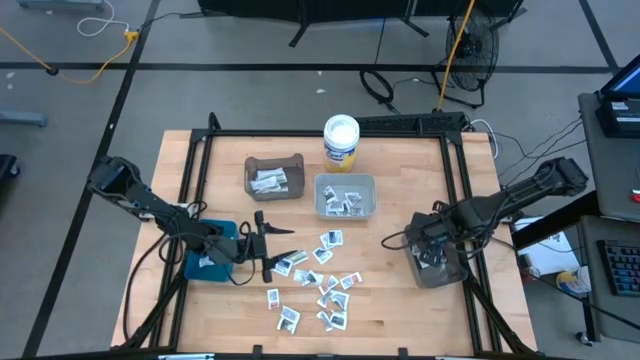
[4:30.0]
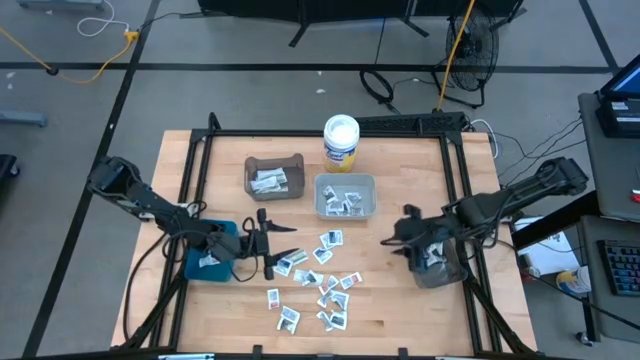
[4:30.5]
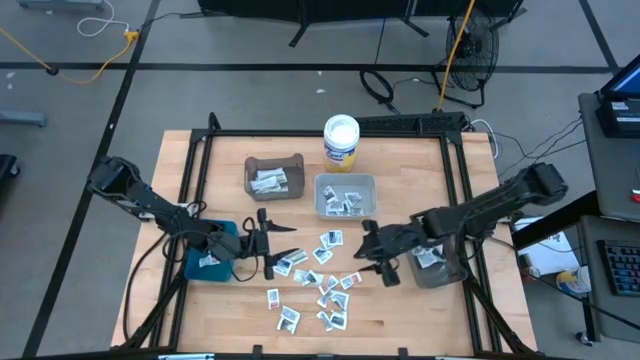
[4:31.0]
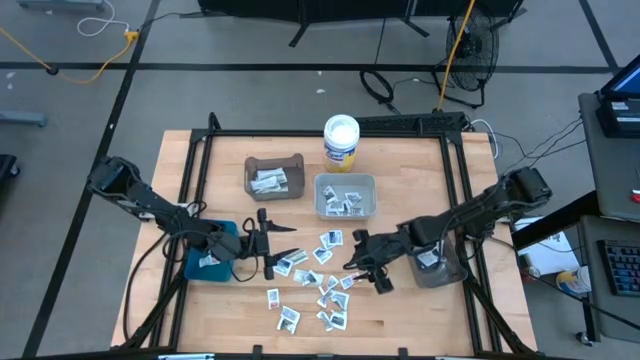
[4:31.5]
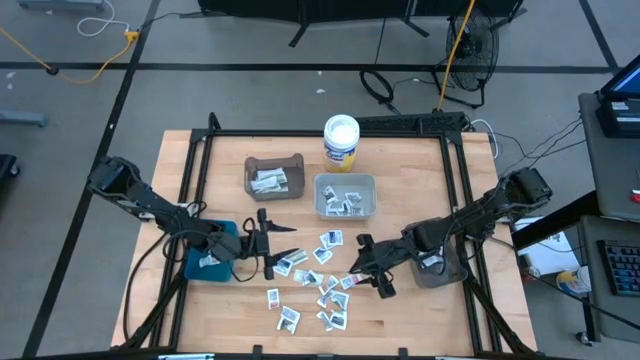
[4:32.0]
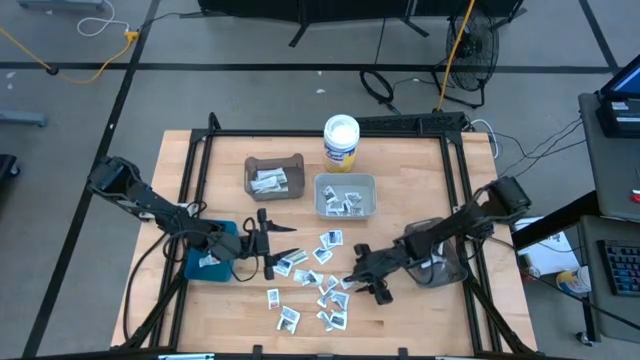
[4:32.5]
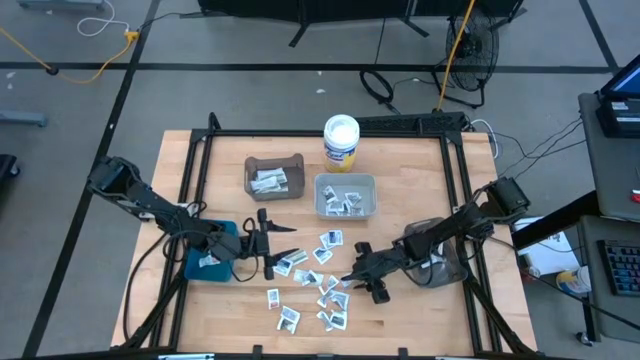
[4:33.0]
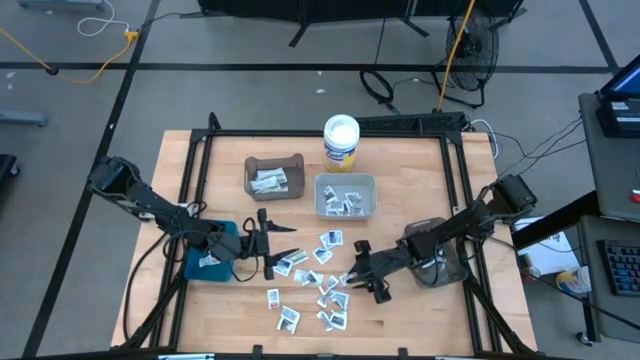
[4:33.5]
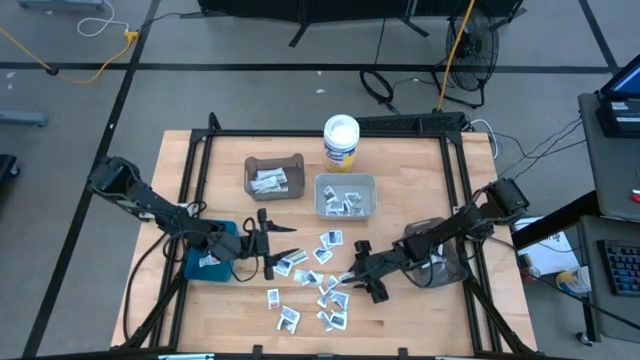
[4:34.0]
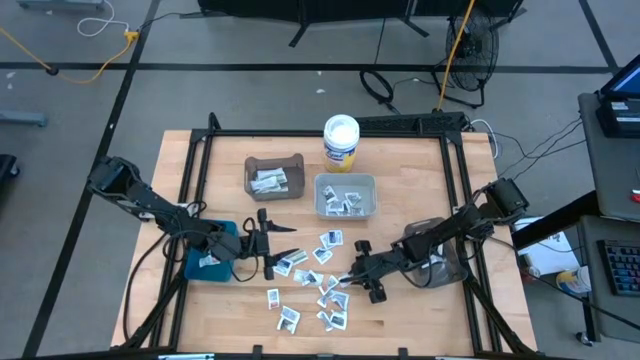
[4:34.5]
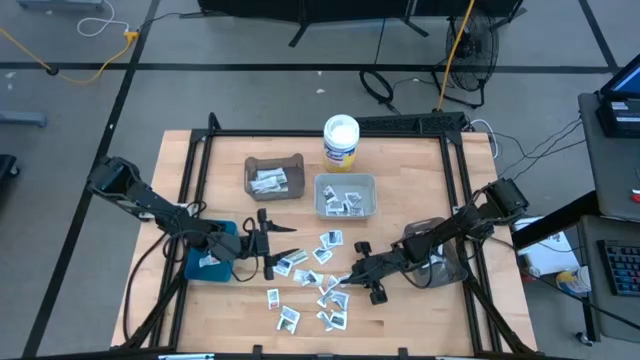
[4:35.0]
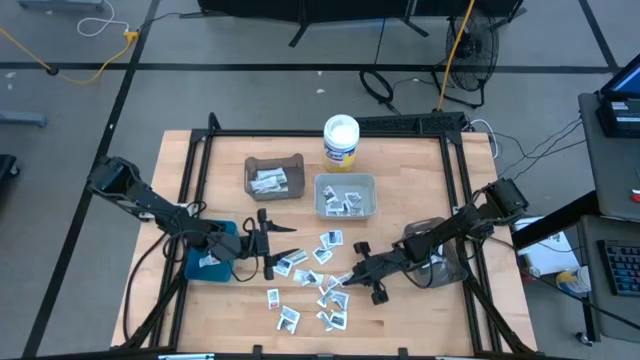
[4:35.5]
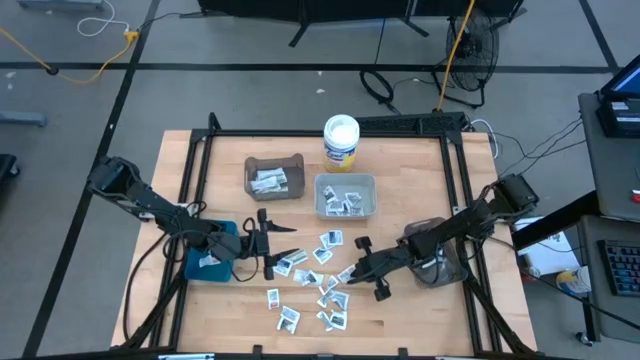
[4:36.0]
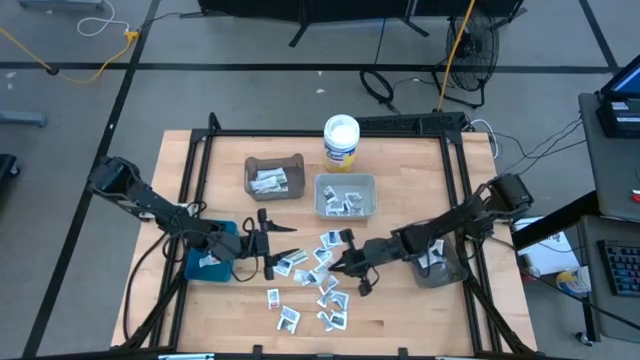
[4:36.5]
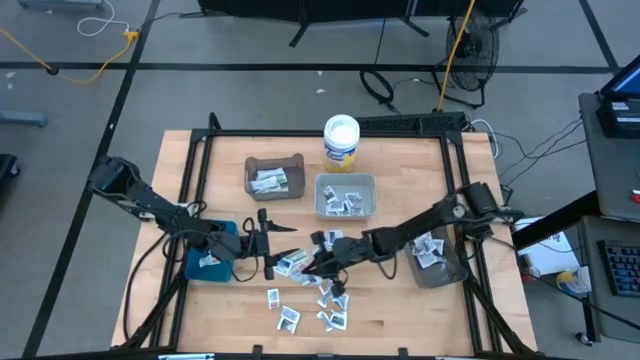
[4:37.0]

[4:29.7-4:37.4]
Task: Pick & Place First Aid Supplies
Move the orange ointment pack to the center of the table

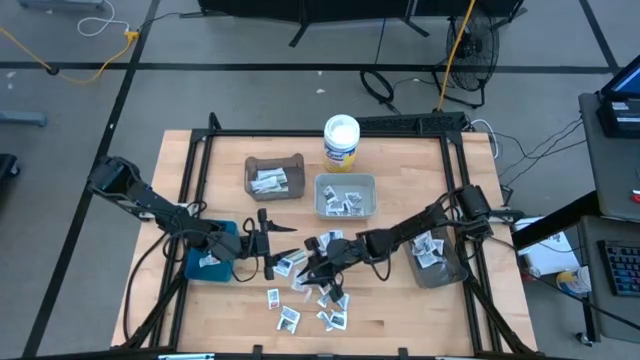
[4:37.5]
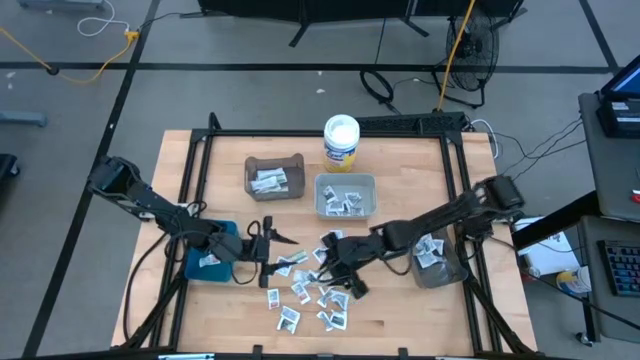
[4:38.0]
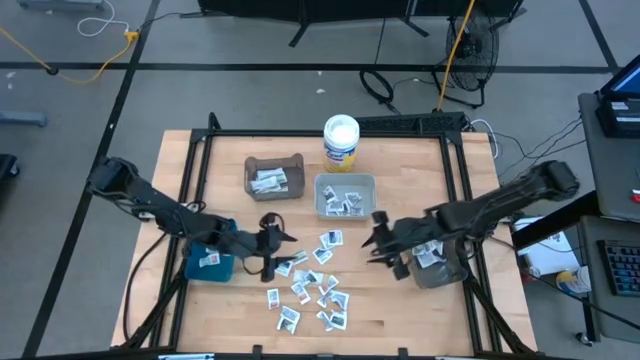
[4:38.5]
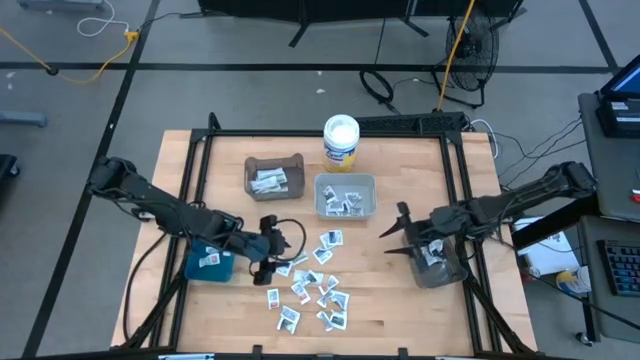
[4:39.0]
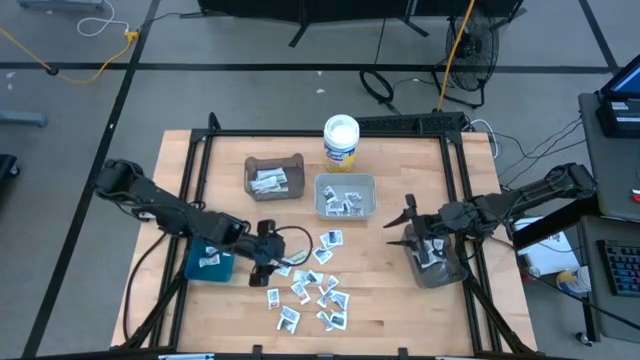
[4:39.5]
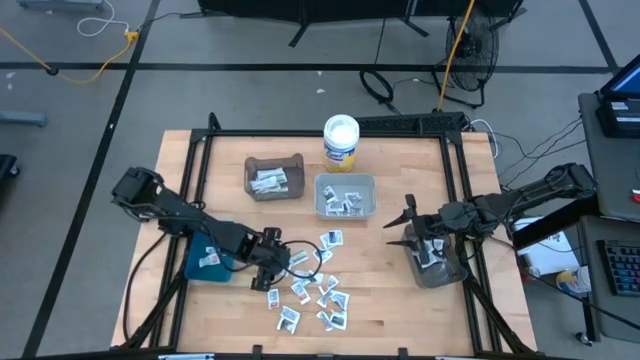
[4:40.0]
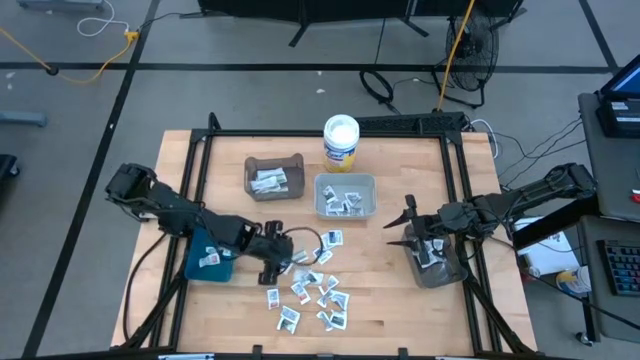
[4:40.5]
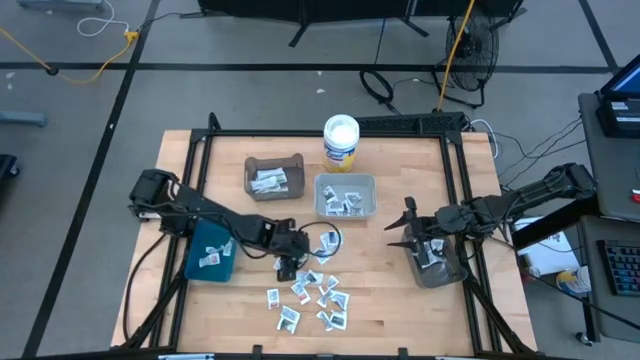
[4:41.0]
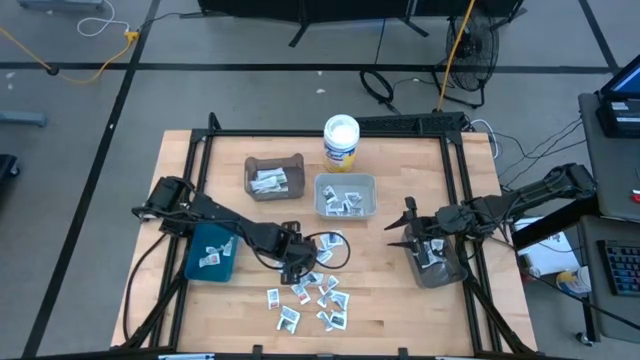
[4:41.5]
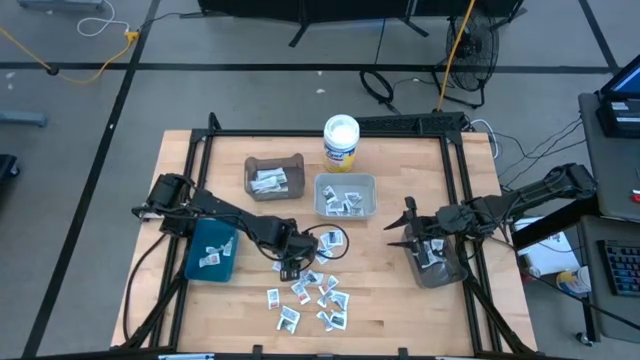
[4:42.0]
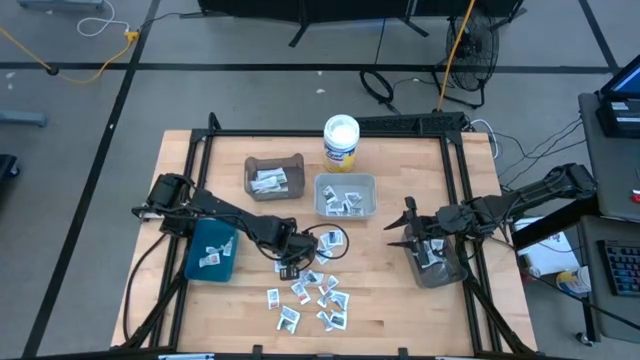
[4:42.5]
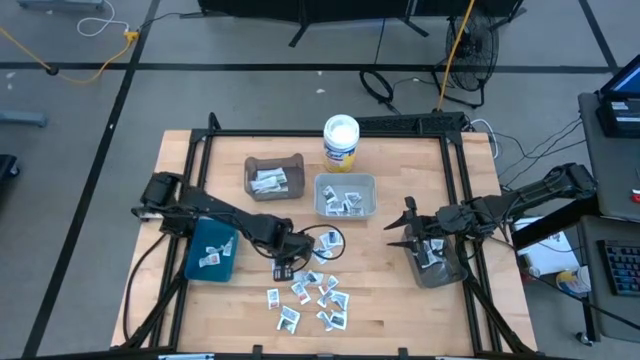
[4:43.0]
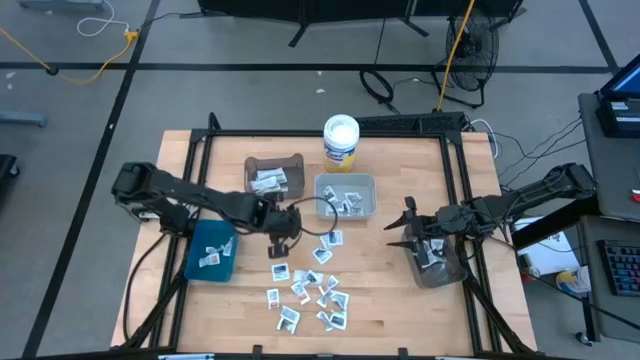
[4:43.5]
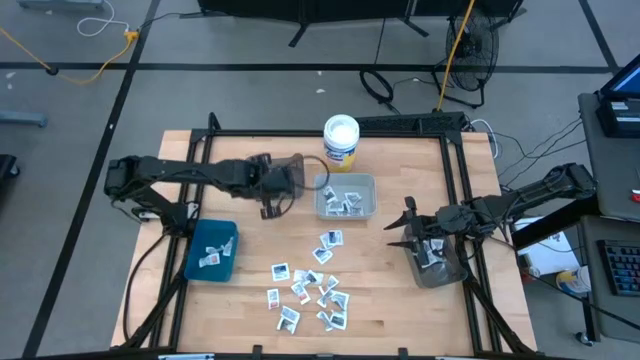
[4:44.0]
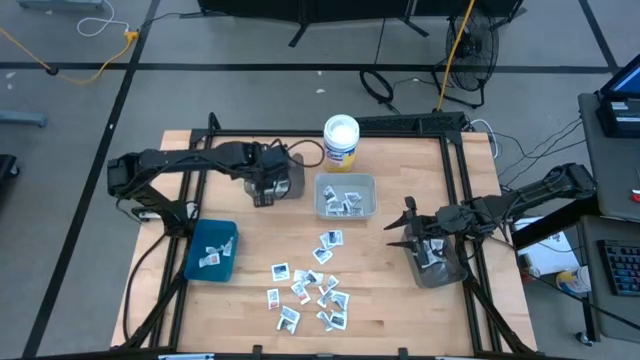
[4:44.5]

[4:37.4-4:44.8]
Put the green bandage pack into the top black bin

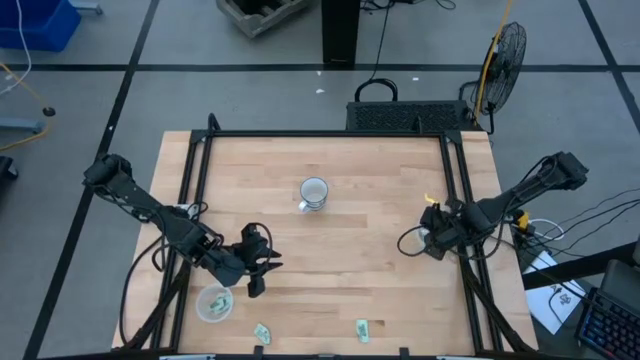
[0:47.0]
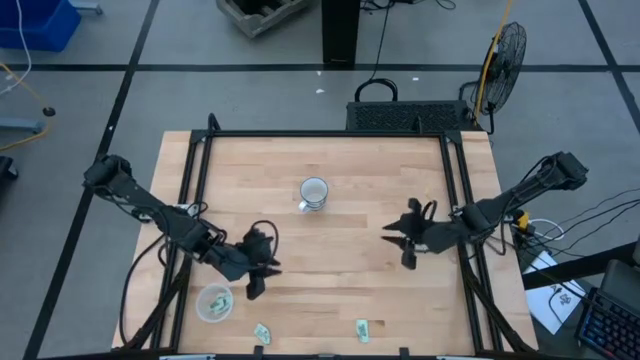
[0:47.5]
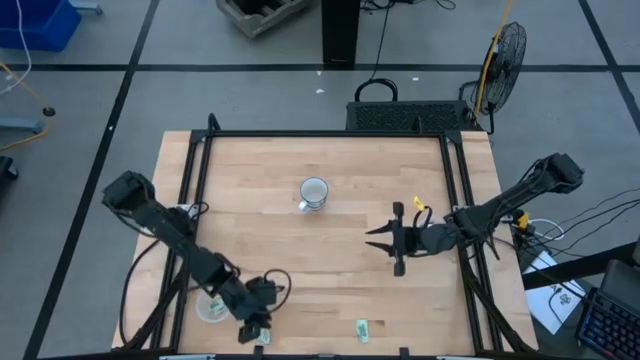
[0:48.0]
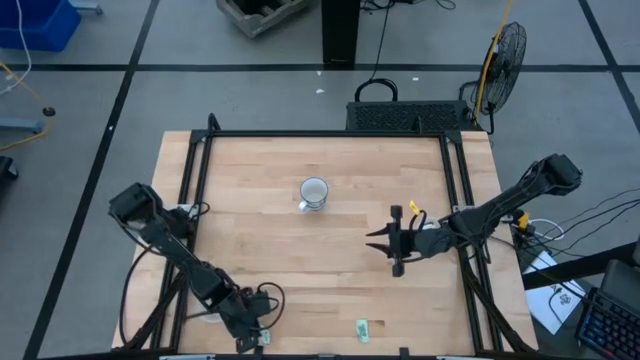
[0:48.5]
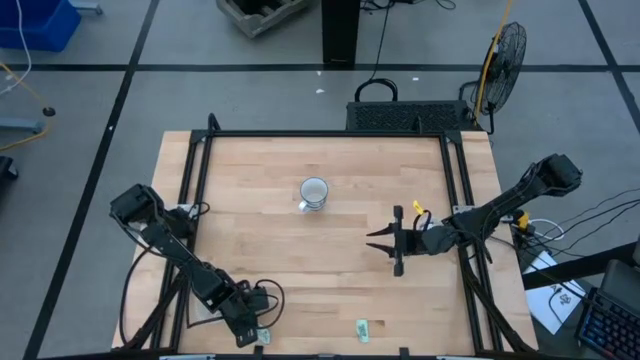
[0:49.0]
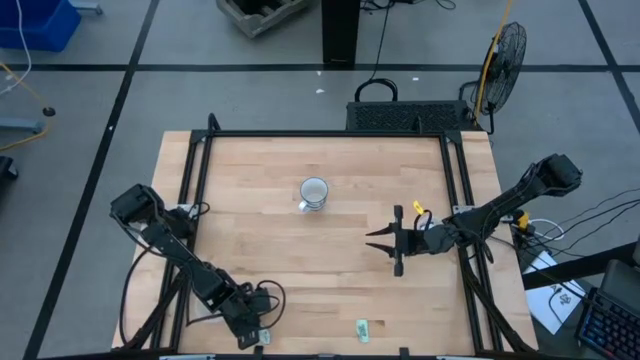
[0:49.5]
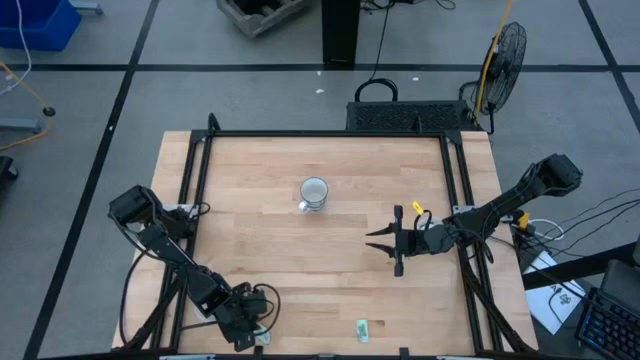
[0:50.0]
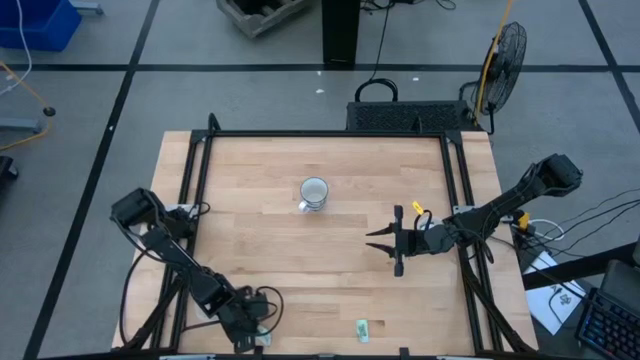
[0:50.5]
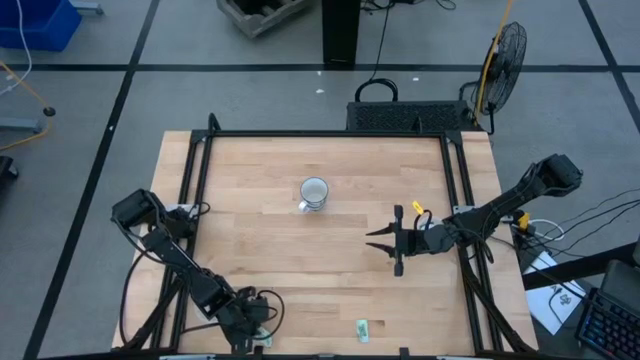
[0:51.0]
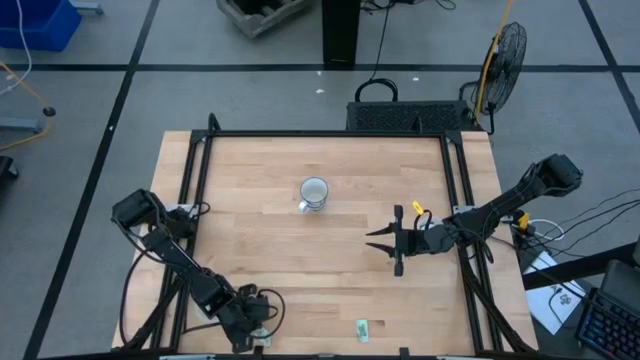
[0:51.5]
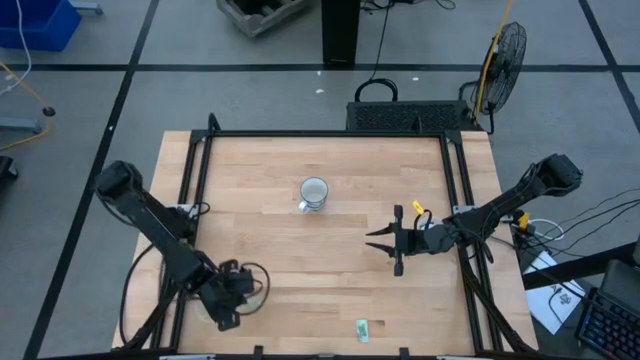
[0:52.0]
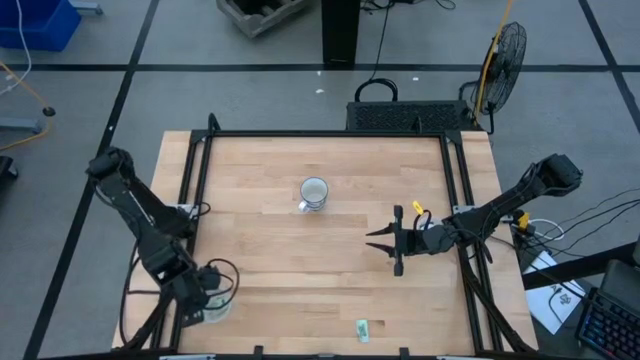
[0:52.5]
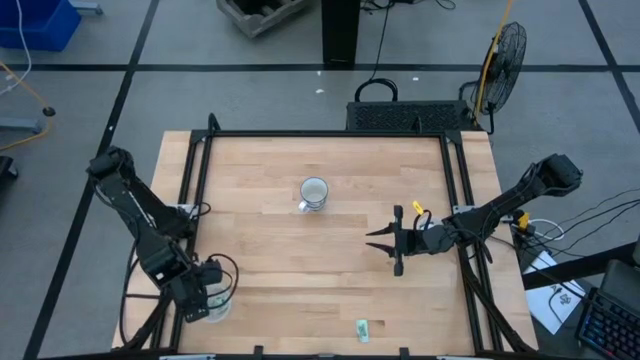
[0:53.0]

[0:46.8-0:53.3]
Task: Pick and place Stevia / Truvia into bins
Put the green stevia packet into the left transparent container
